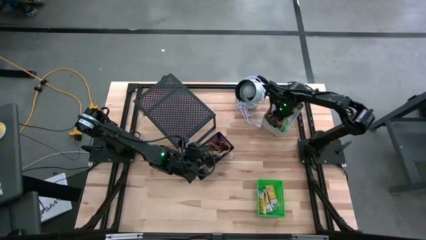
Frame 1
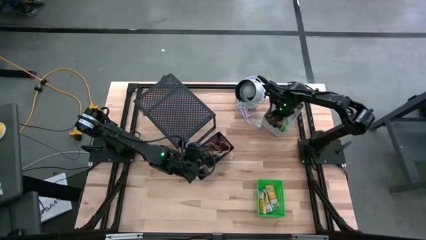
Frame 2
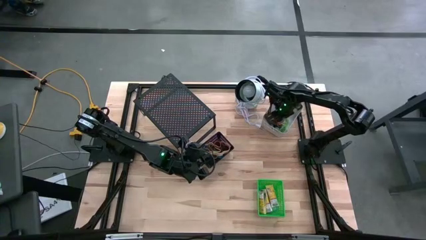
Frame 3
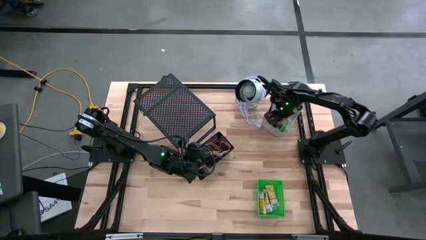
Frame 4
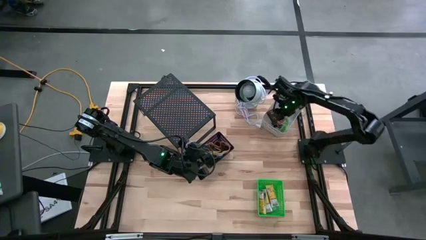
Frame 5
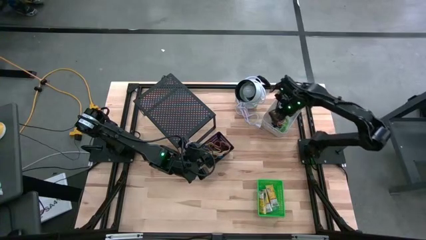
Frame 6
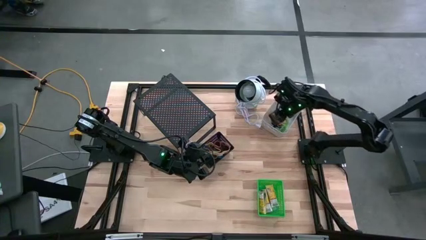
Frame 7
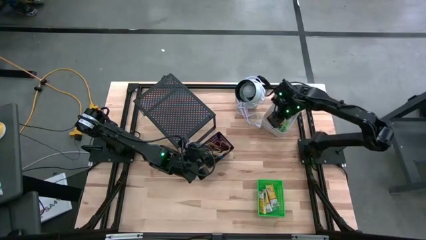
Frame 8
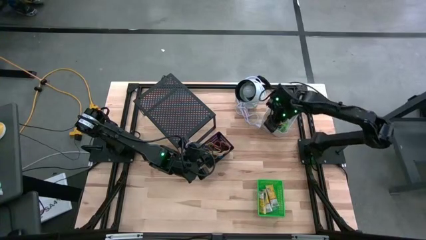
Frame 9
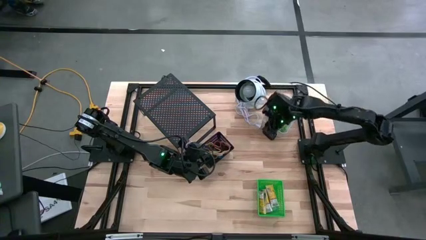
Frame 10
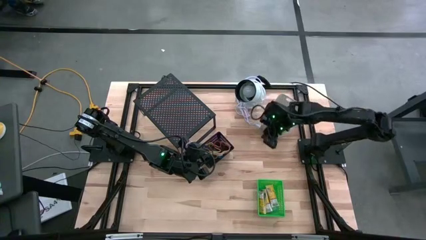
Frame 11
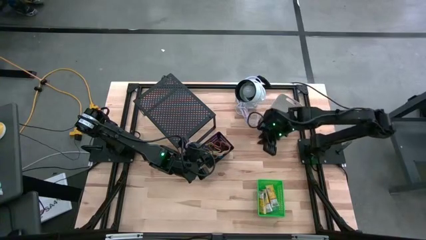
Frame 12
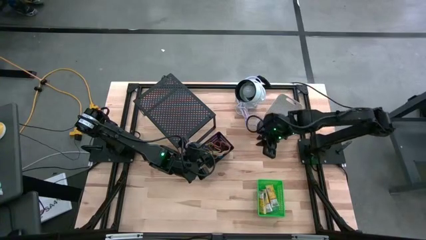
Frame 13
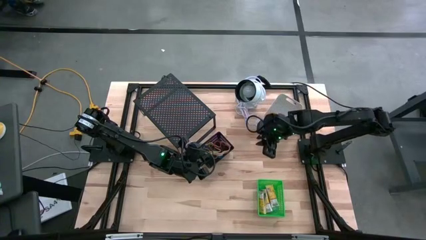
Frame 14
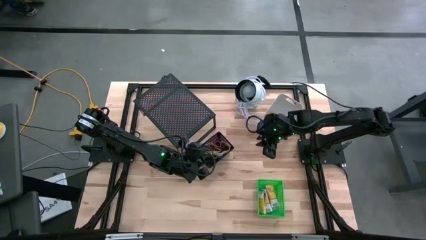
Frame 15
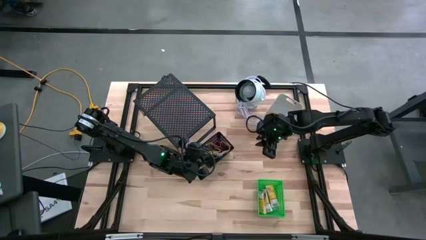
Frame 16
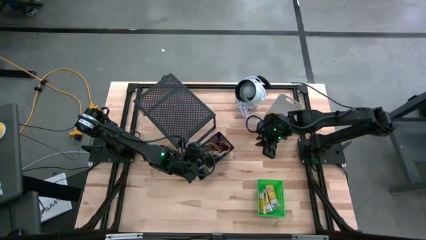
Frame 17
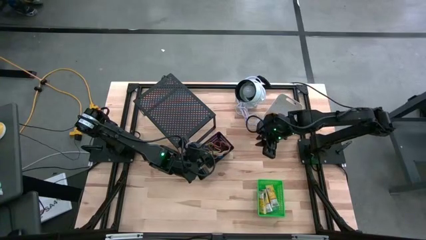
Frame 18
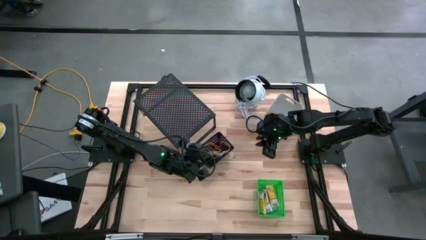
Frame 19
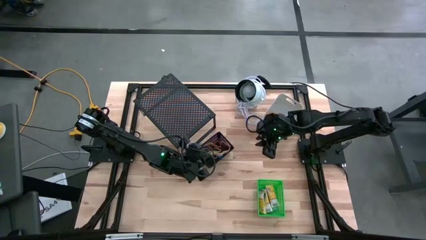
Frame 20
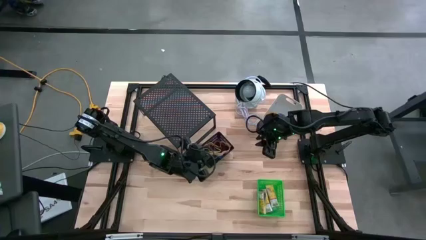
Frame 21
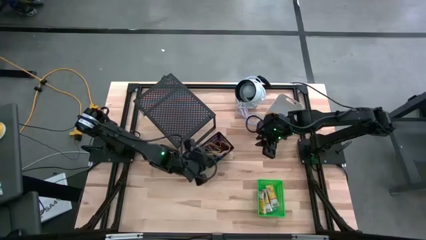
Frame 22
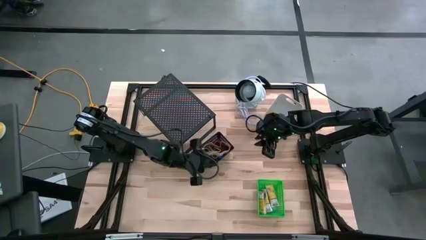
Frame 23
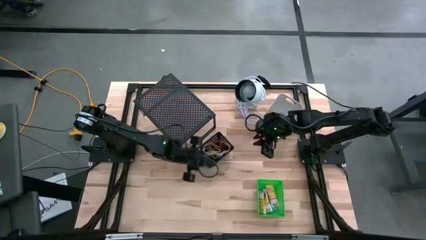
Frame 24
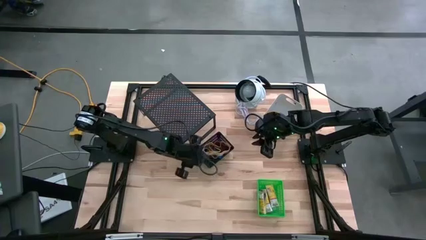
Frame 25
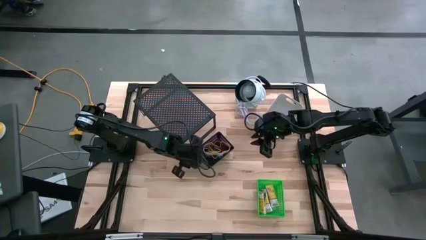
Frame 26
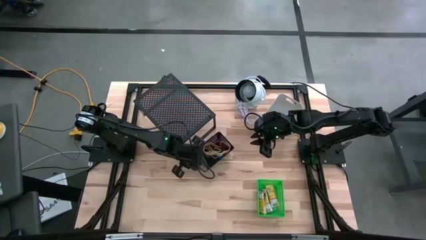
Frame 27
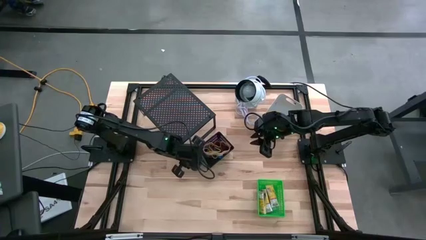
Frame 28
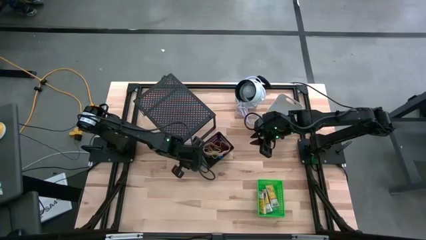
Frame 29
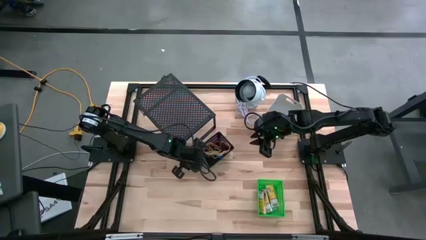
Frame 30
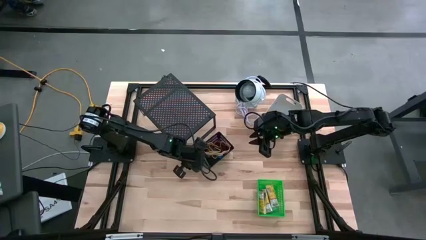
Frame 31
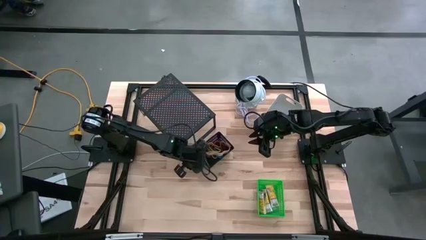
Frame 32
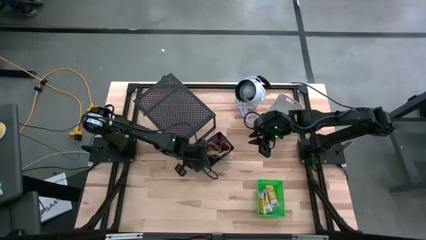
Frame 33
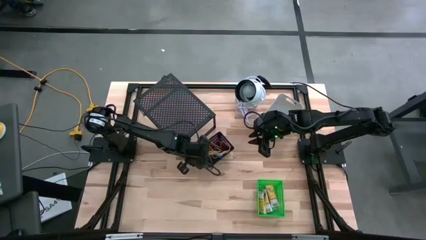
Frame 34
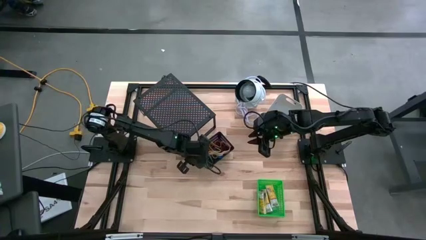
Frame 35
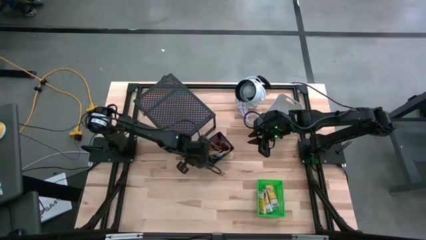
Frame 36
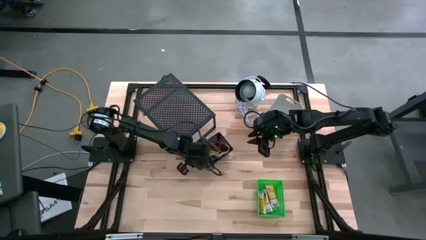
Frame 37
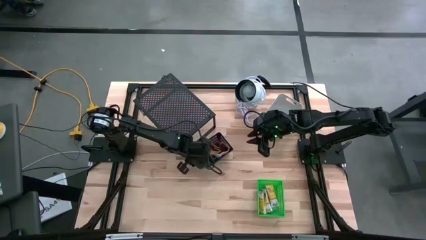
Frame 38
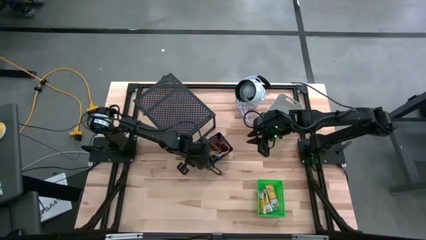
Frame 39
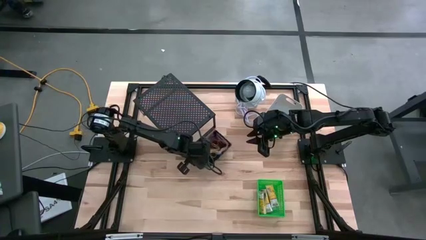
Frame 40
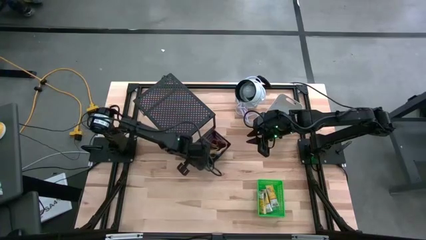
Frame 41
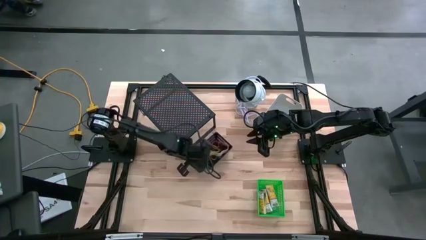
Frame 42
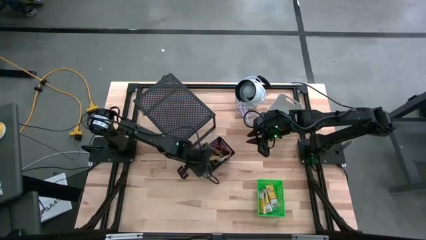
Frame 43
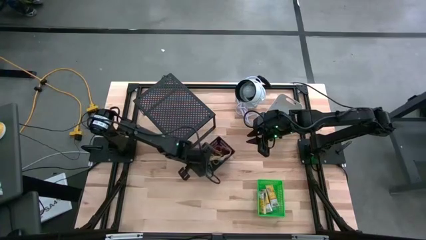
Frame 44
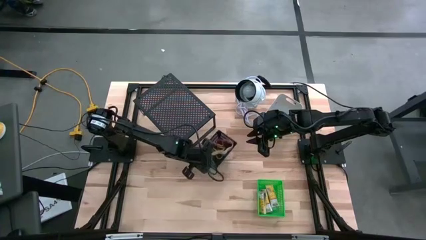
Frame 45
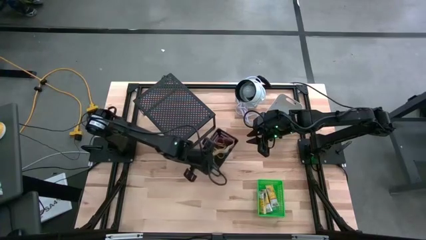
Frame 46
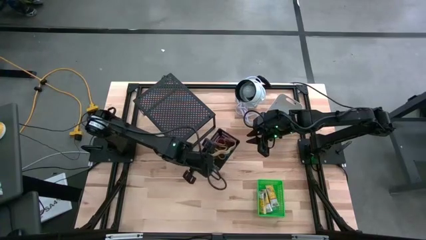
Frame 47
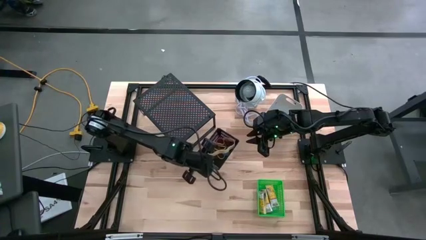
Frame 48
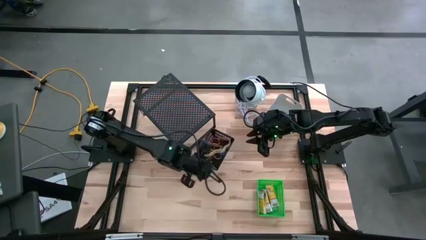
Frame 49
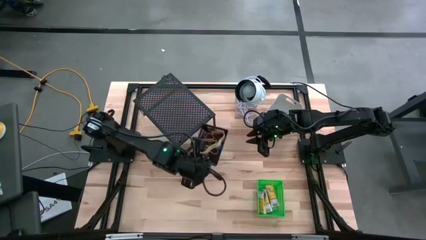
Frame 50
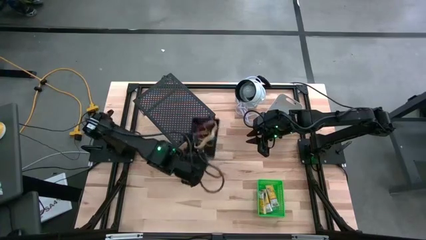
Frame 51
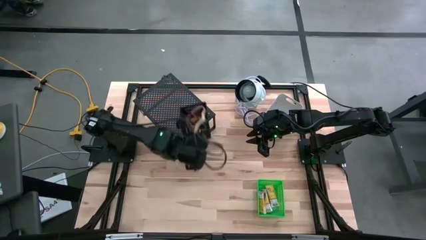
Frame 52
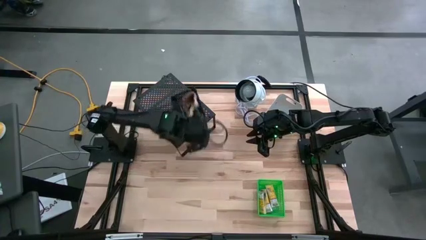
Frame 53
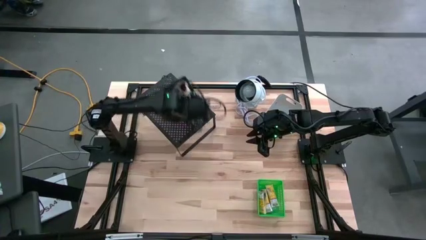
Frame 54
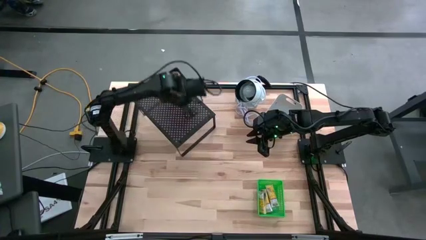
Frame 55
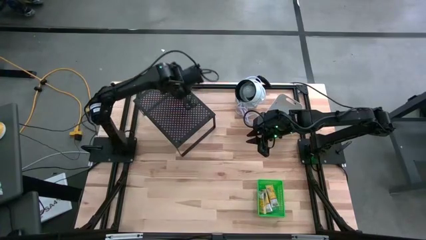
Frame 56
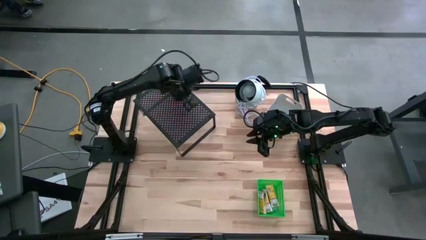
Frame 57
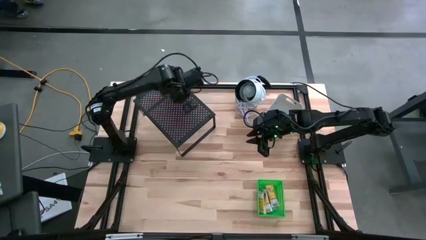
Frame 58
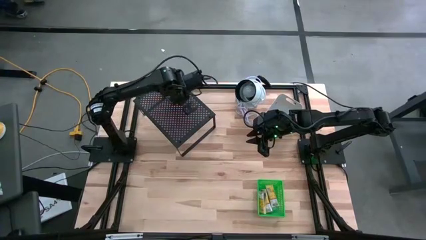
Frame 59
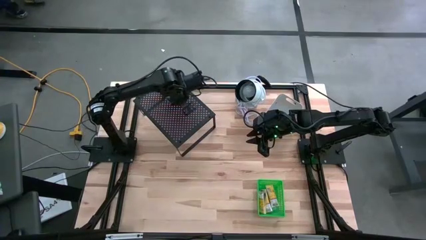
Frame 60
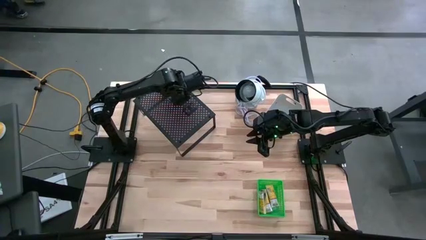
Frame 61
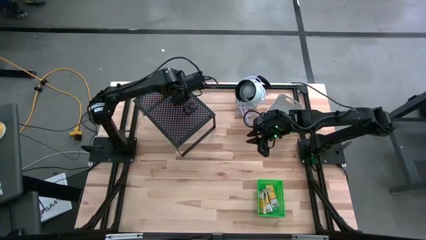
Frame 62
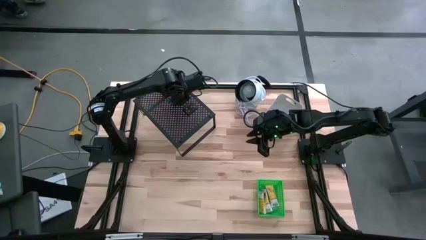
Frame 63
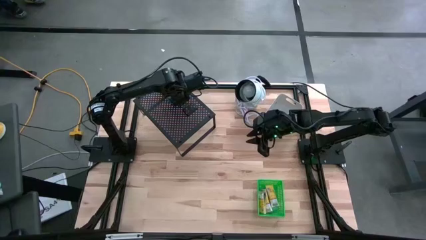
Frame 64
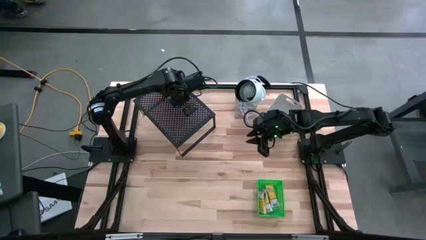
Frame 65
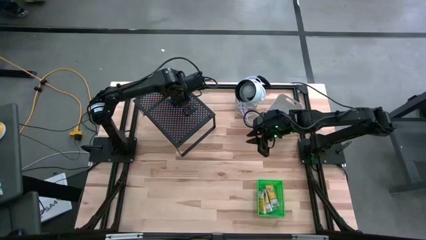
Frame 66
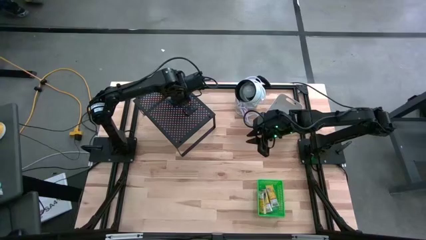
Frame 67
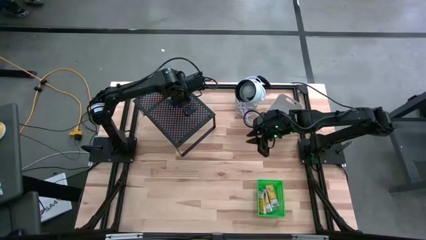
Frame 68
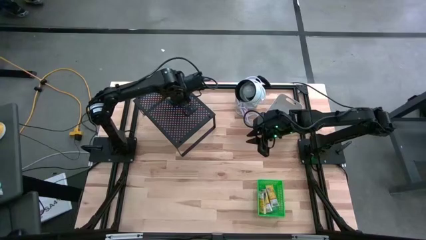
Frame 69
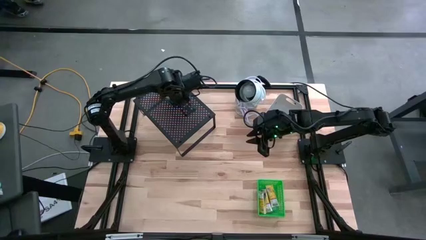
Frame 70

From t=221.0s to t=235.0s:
Task: Pick & Place Office Desk Supplies
Put the black bin on the shelf

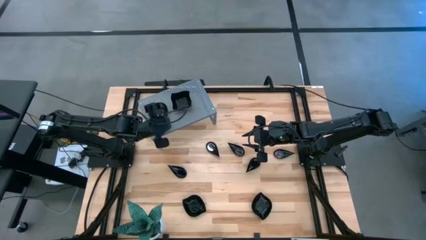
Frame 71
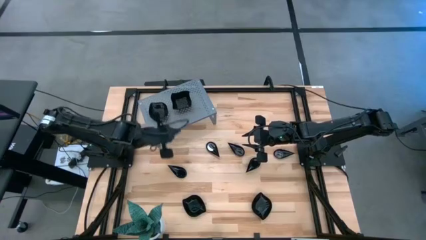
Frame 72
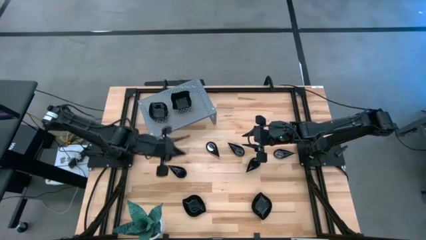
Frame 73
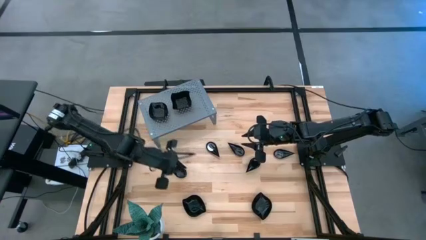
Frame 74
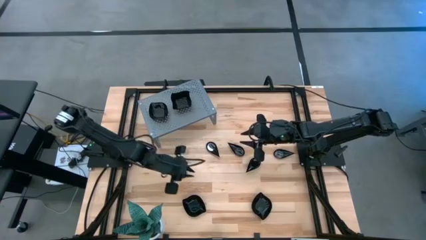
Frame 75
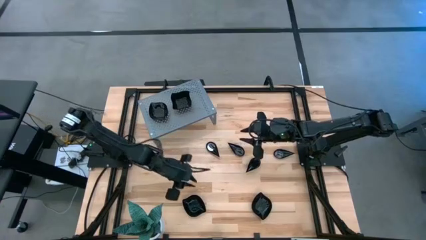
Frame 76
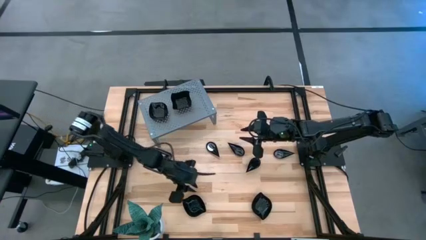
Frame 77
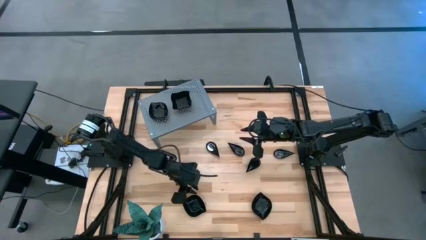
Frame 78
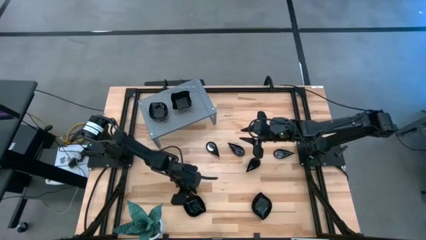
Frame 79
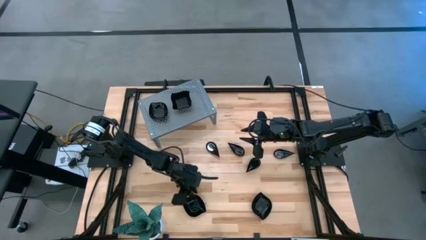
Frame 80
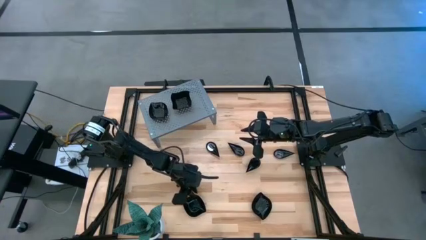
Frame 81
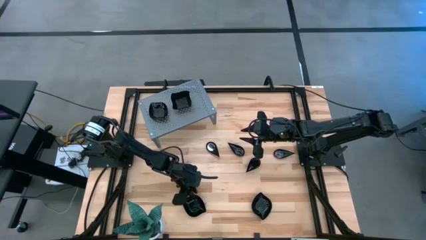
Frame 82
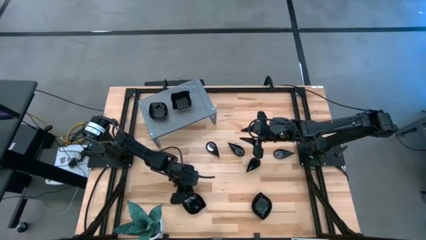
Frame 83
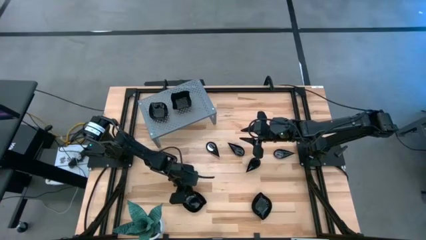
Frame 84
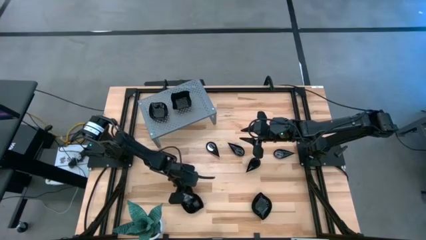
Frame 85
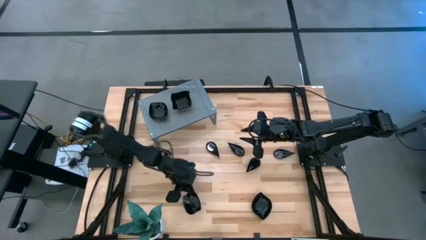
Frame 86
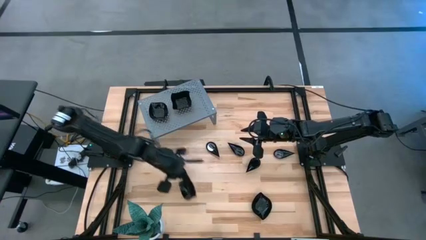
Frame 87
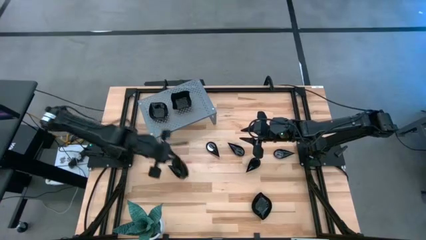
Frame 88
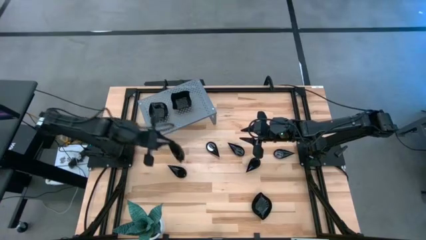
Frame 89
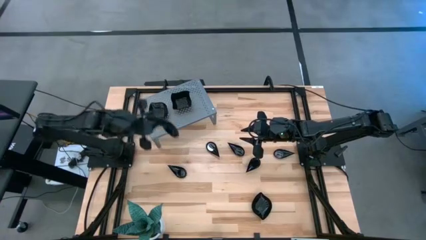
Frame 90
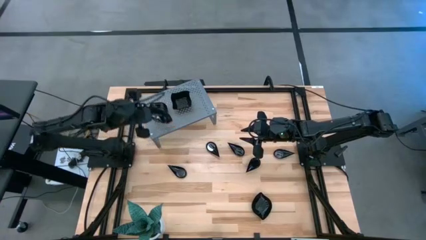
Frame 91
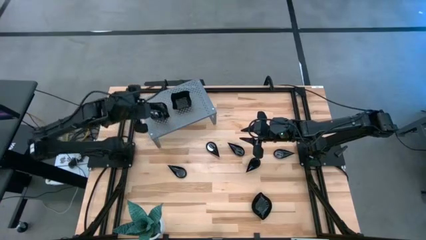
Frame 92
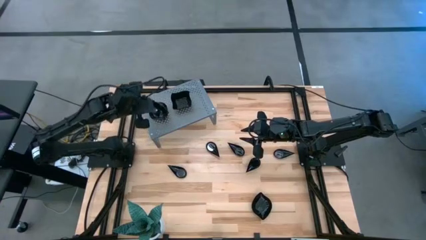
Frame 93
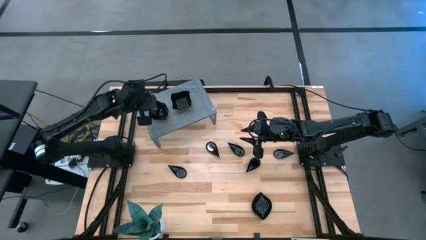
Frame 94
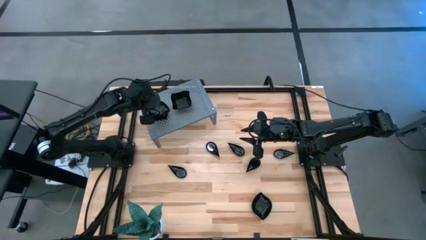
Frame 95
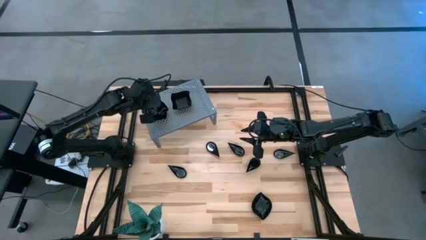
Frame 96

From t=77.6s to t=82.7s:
Task: Pick & Place Mini shaped plates
Stack the black leaf-shaped plate on top of the black leaf-shaped plate on the shelf
